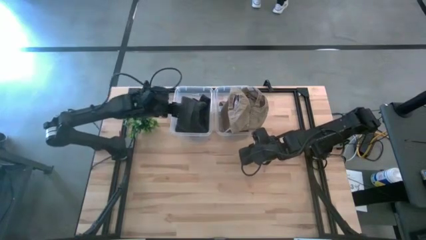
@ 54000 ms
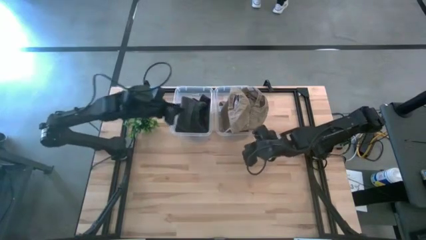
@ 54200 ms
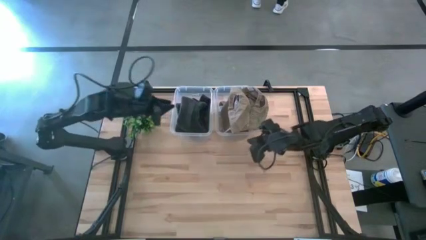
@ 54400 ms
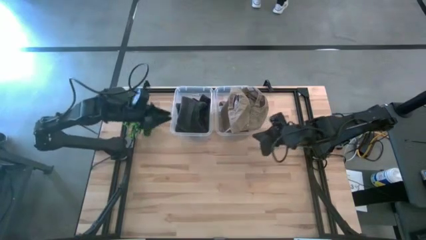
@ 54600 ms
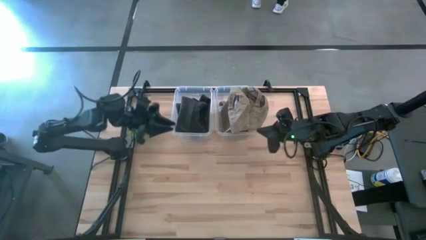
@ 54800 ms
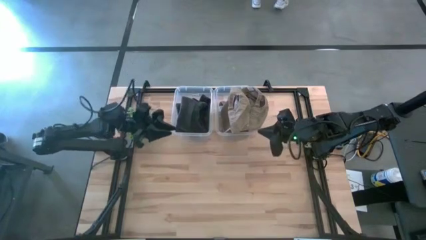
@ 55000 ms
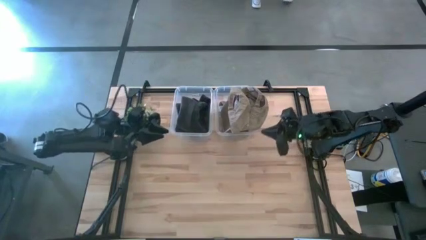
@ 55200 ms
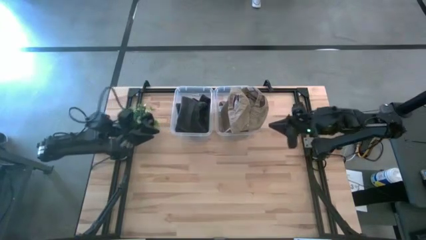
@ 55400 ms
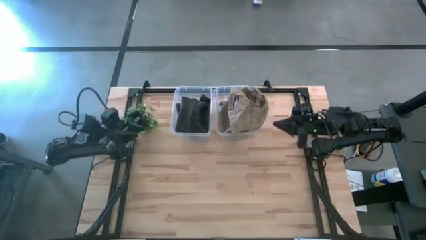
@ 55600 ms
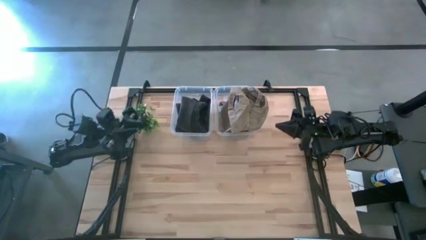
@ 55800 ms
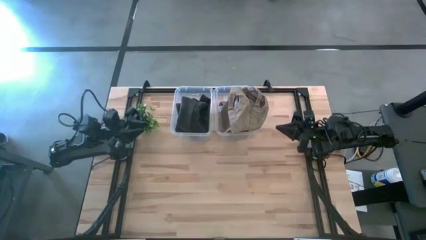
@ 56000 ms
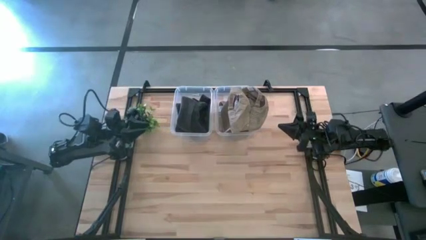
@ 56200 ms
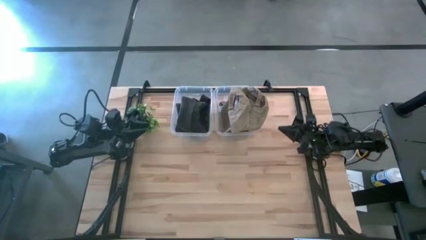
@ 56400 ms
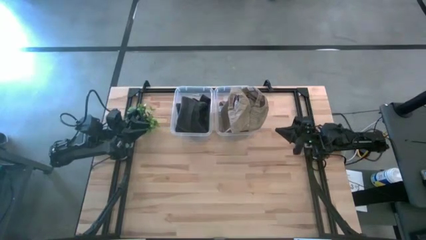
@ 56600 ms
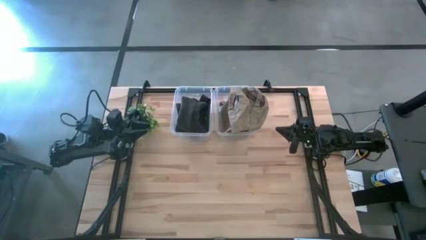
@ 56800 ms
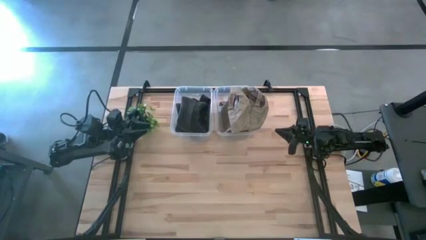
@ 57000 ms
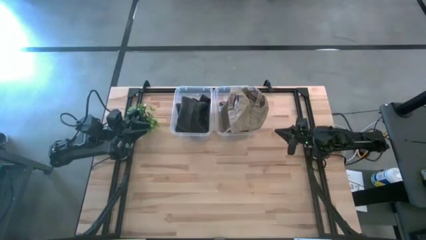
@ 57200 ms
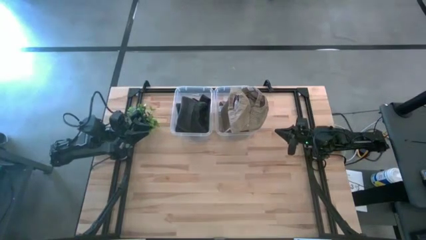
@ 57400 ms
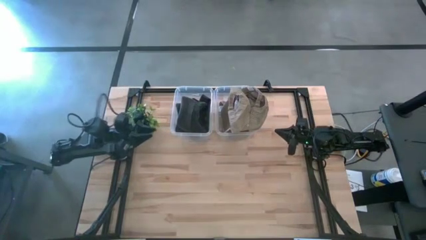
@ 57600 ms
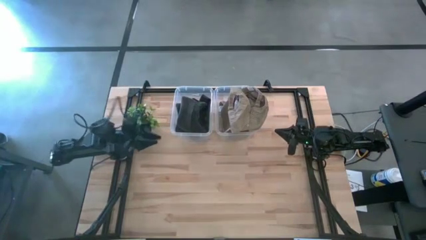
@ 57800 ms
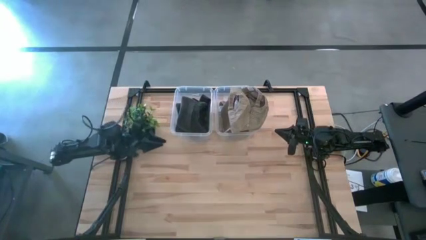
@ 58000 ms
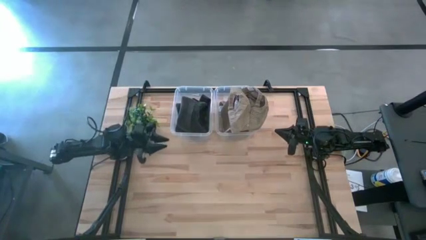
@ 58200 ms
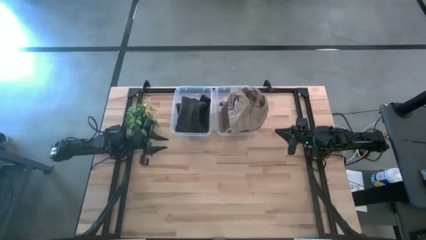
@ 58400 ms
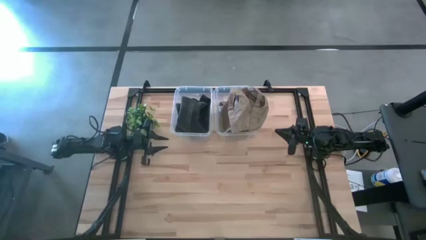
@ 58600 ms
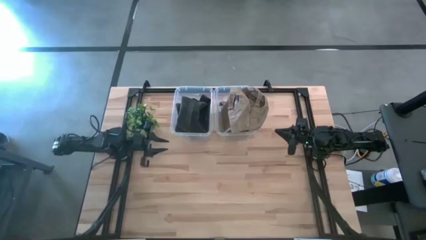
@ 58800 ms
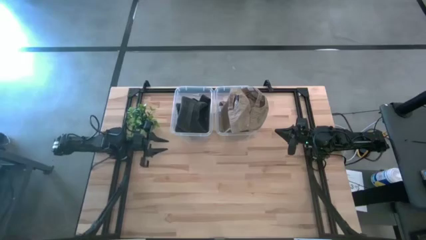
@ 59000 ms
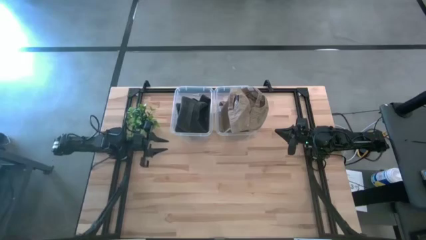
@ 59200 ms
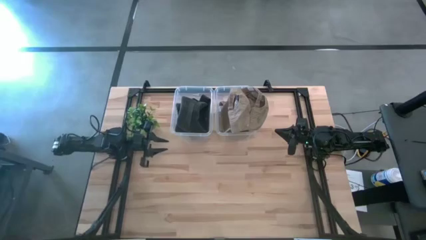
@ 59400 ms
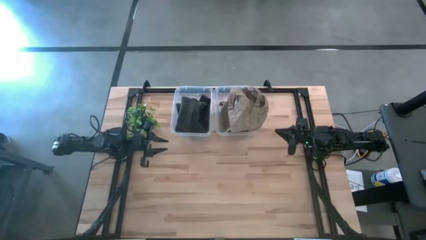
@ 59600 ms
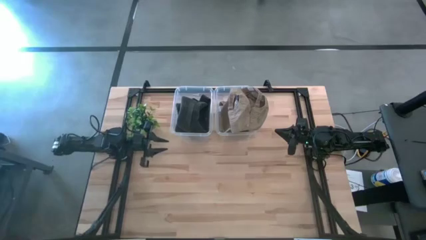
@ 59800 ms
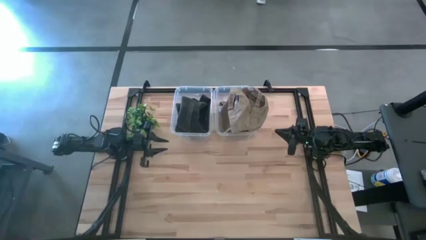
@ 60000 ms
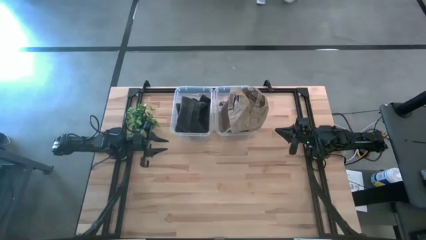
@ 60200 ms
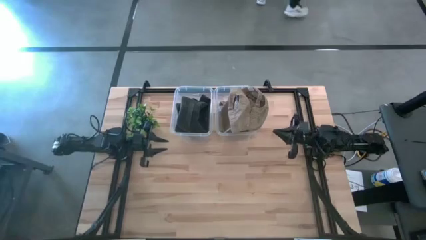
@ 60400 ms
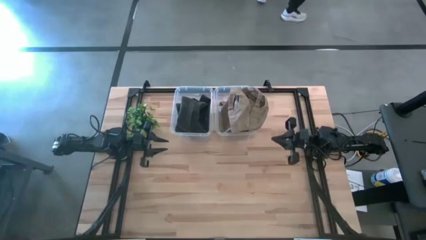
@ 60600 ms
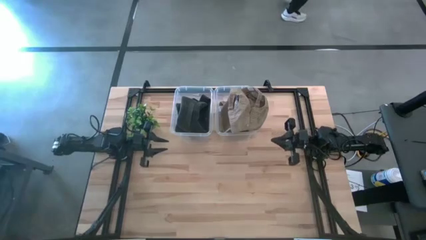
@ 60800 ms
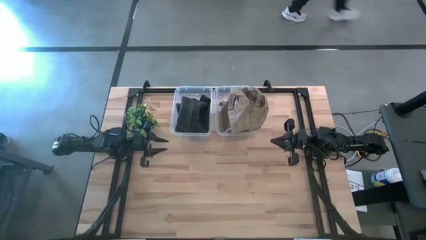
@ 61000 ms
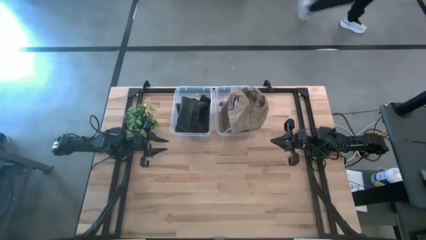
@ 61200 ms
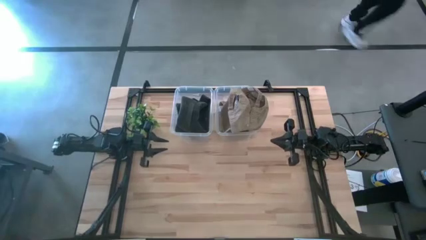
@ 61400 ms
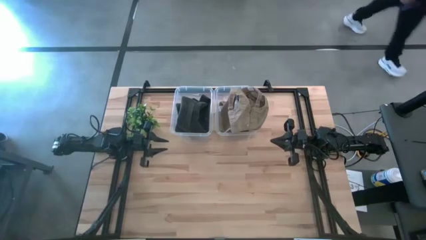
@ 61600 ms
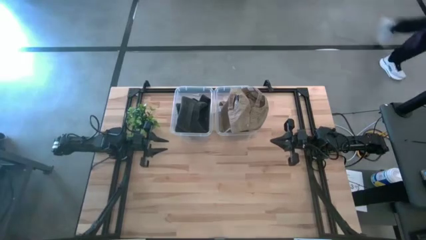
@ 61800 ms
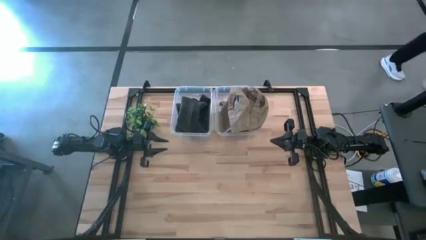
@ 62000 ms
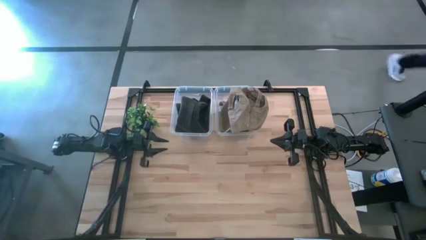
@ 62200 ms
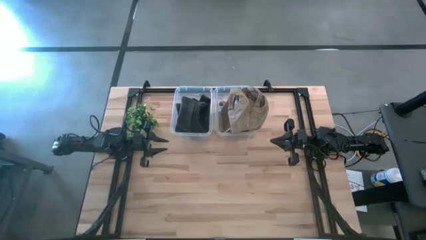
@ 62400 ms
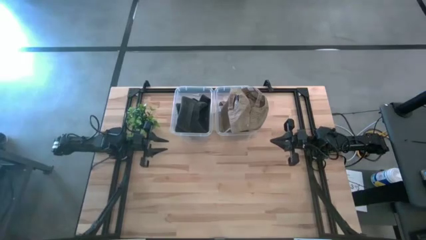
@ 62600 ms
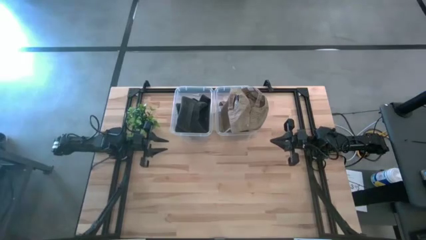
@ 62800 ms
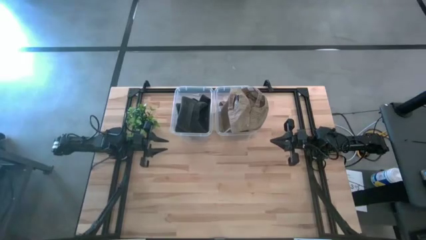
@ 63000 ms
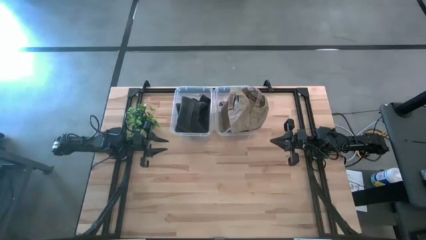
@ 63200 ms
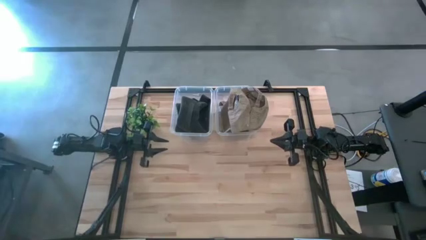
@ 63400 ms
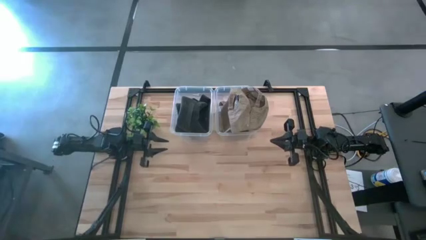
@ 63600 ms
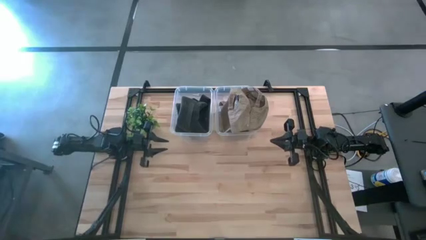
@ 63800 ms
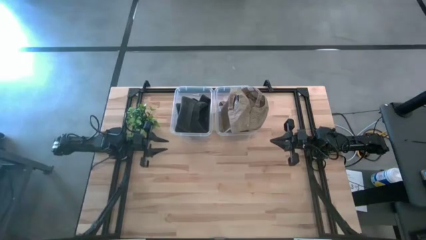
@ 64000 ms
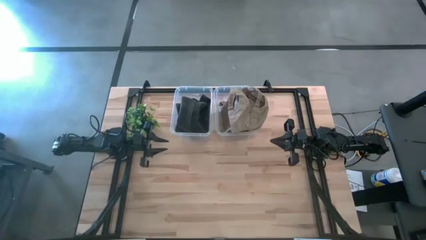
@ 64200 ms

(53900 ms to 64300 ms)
Task: Pick & Place hat
Return to Home Position

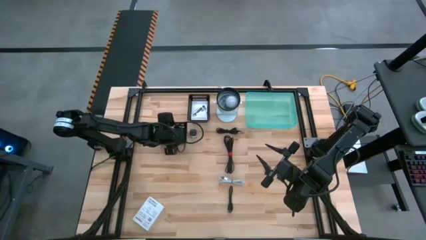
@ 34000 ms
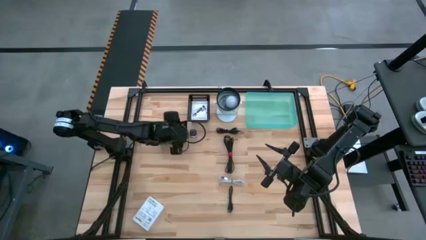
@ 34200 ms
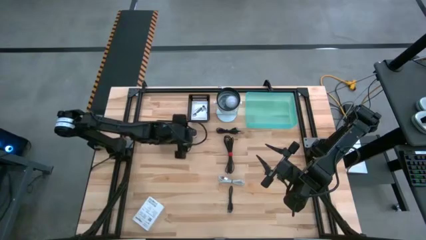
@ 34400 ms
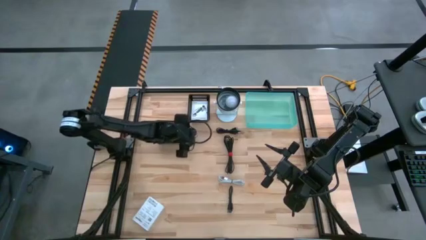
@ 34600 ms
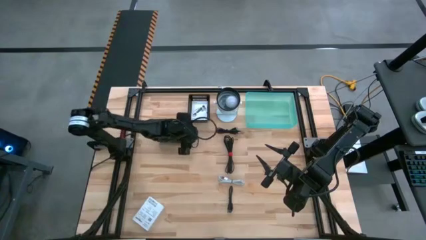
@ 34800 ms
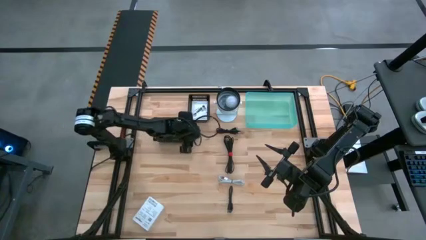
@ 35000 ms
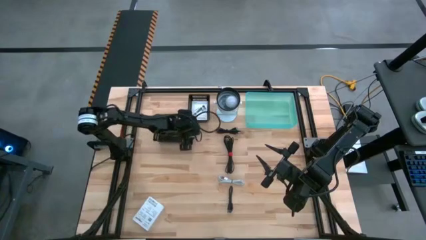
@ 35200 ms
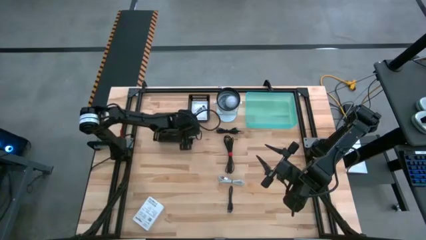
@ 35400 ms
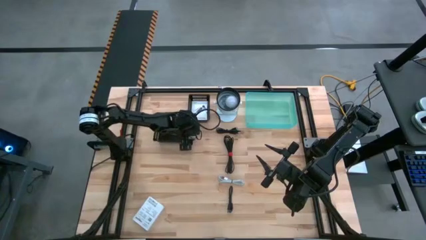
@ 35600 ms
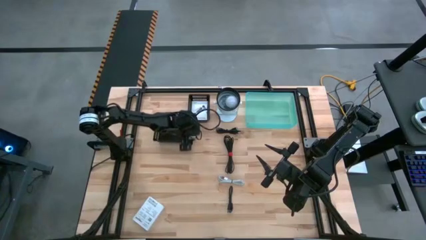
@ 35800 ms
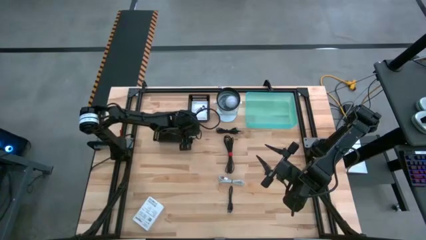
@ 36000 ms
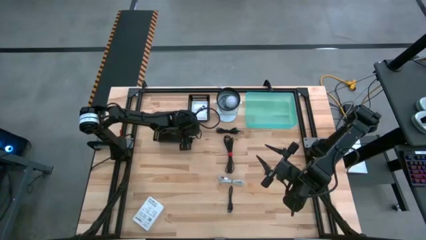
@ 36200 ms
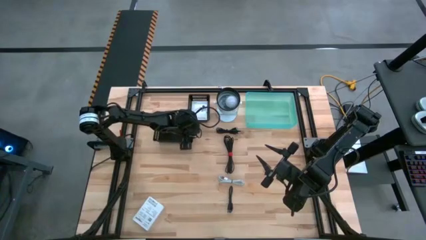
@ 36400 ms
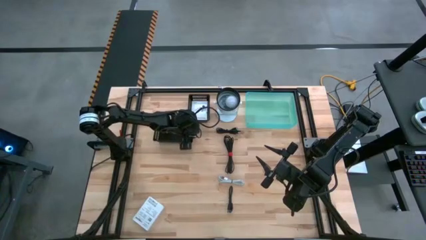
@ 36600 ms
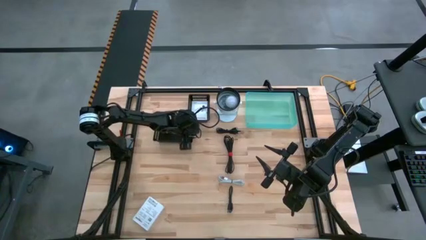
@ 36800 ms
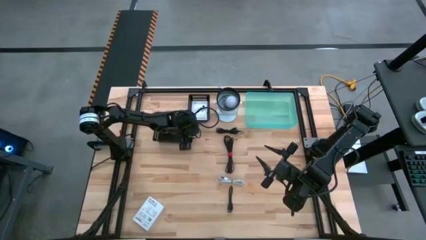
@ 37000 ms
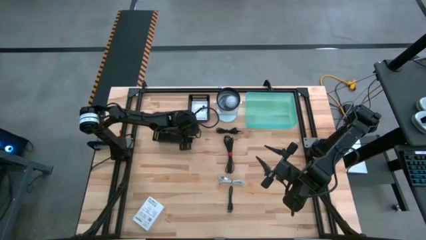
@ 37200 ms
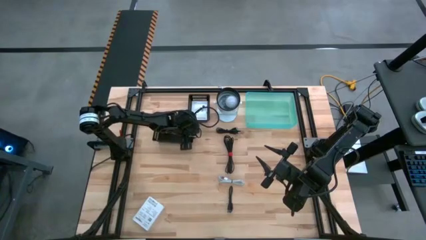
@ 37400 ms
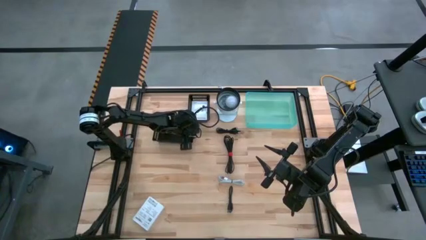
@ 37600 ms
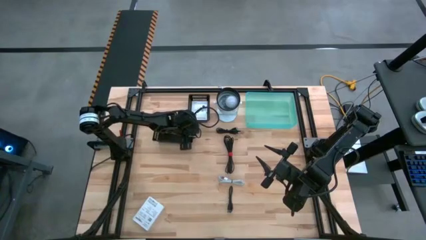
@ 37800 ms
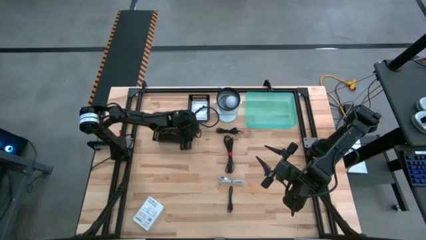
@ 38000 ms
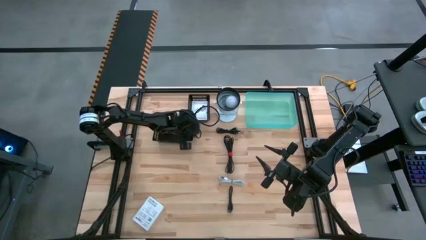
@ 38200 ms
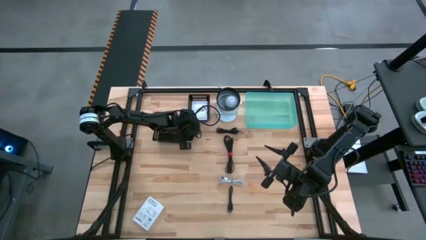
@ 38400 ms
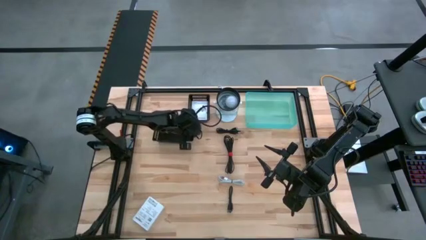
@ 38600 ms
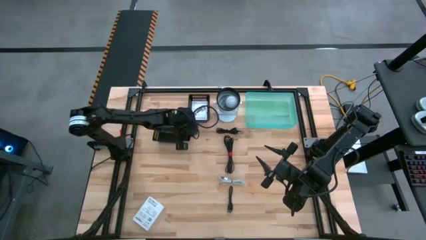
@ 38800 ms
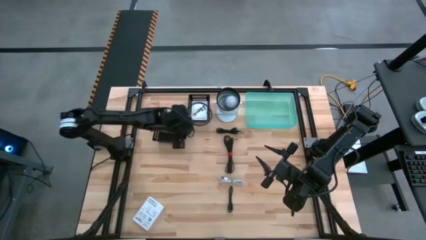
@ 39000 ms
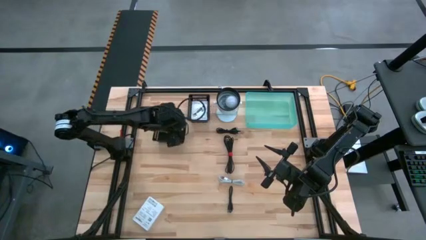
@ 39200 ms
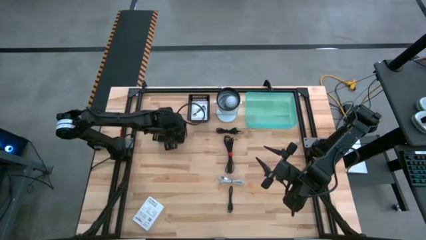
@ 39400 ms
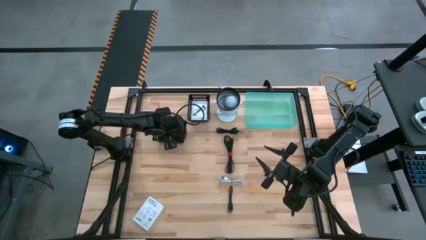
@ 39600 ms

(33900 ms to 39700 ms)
Task: Pick and place items into bin
Put the white adapter into the bottom black bin
